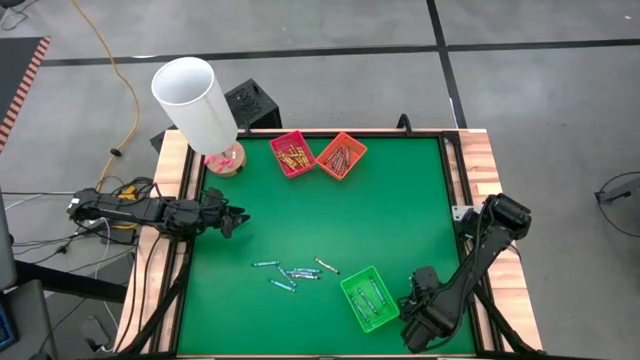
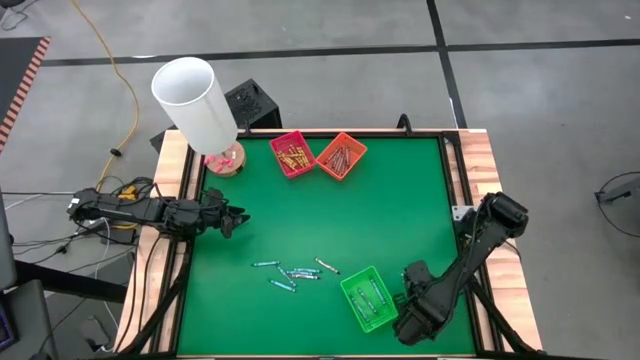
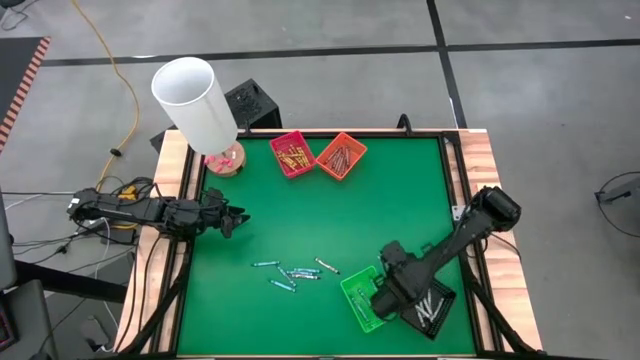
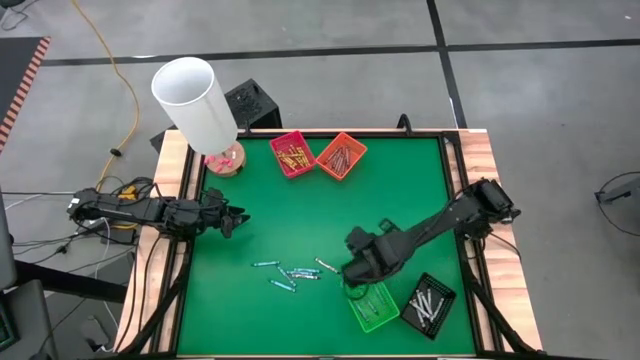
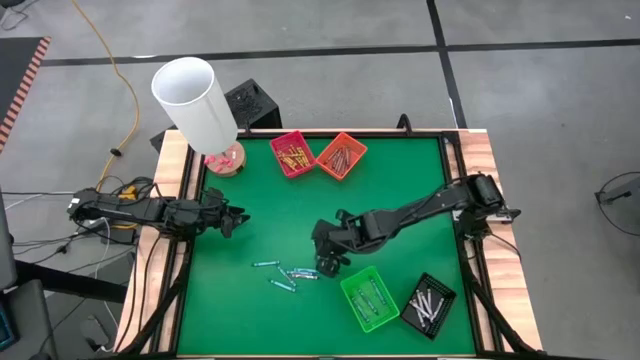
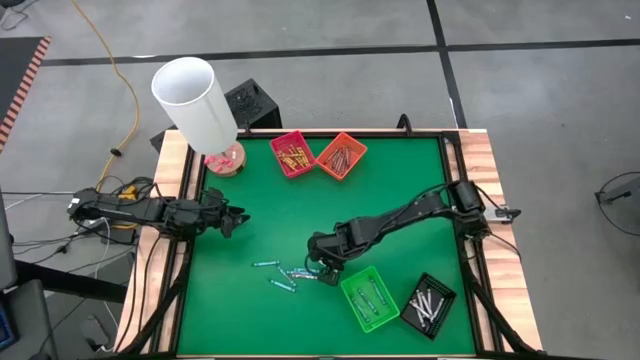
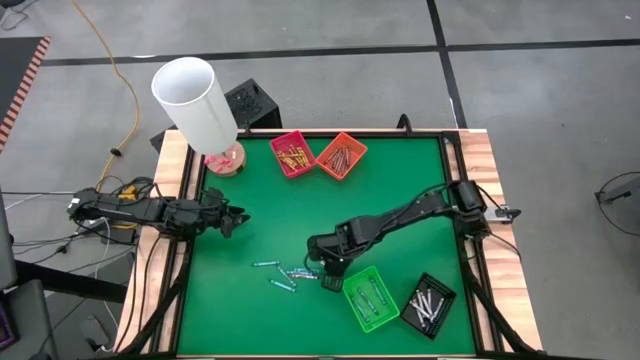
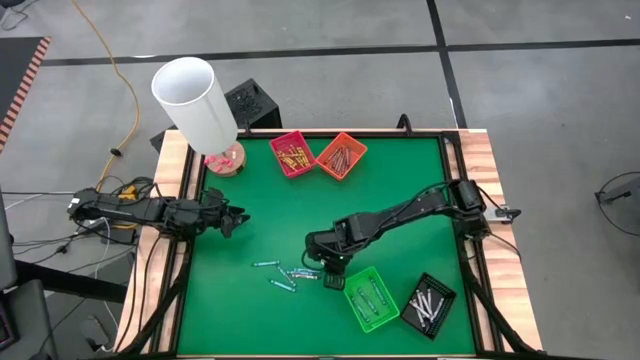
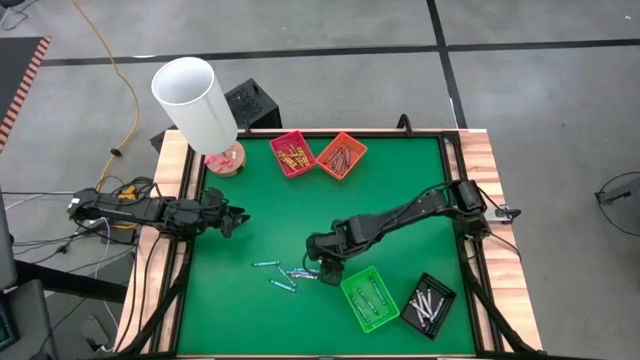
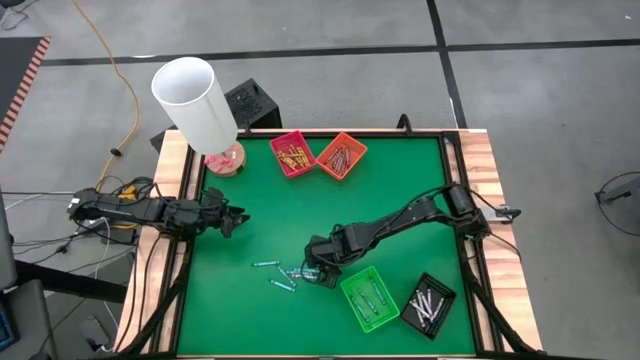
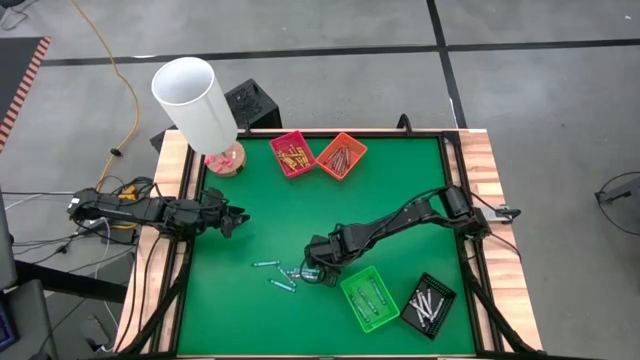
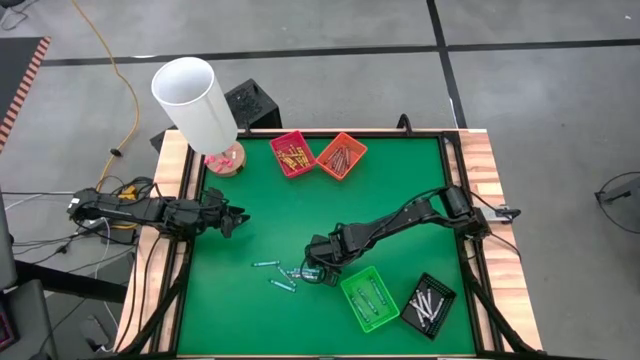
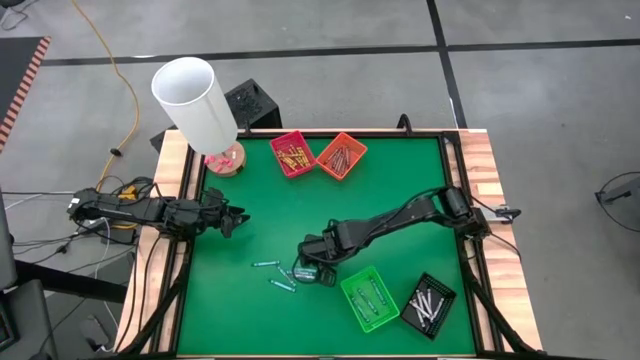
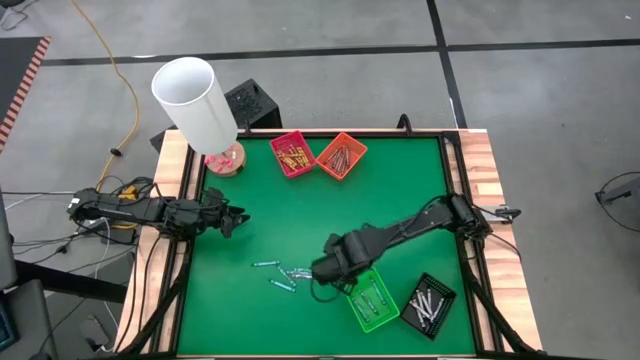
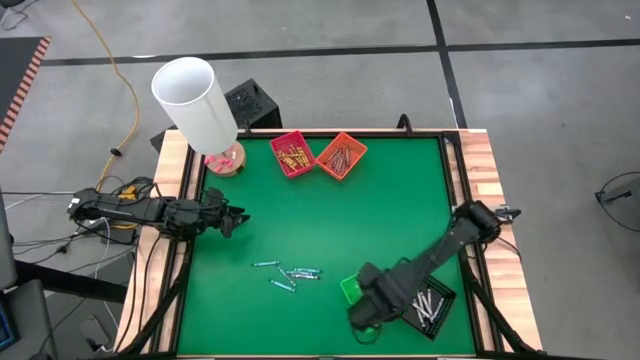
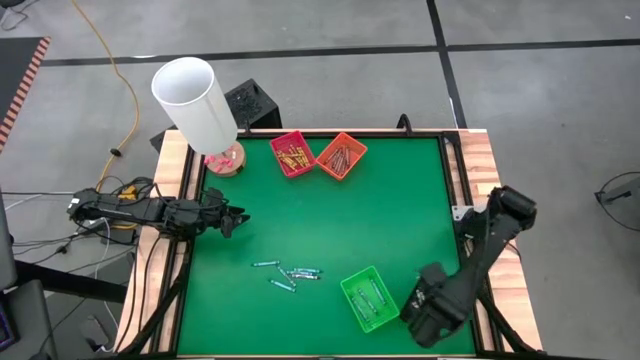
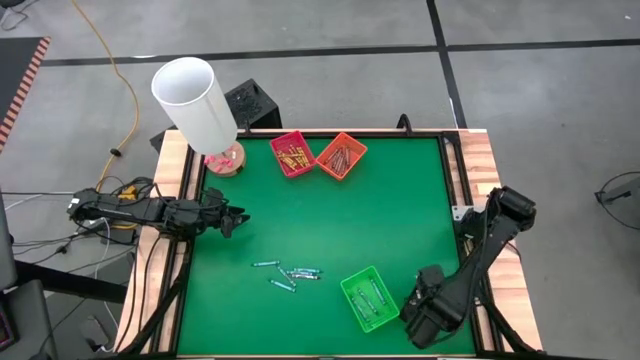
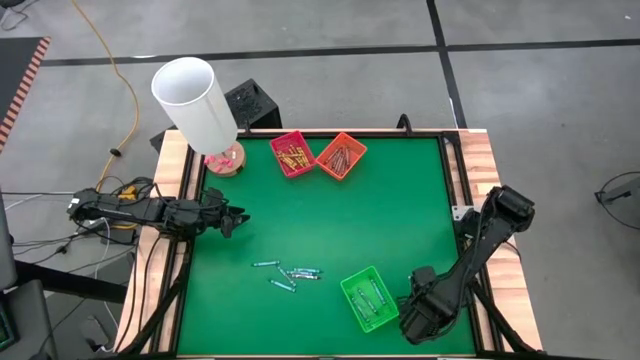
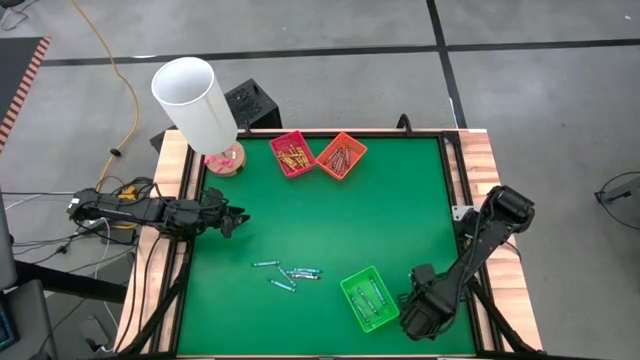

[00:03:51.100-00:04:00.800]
Task: Sort crayons
Put the black crayon into the black bin

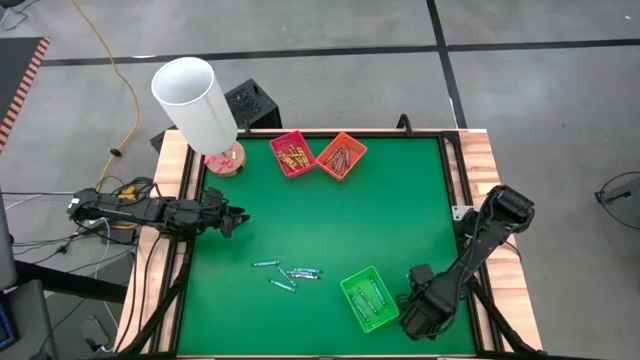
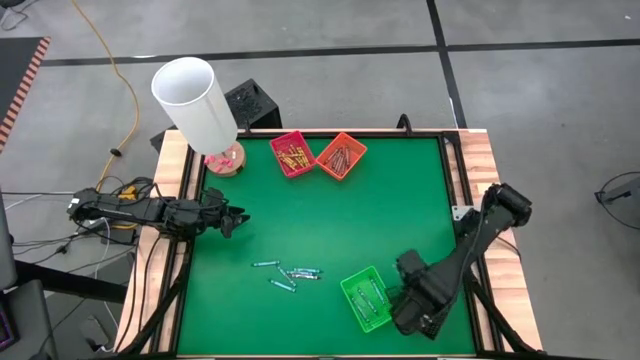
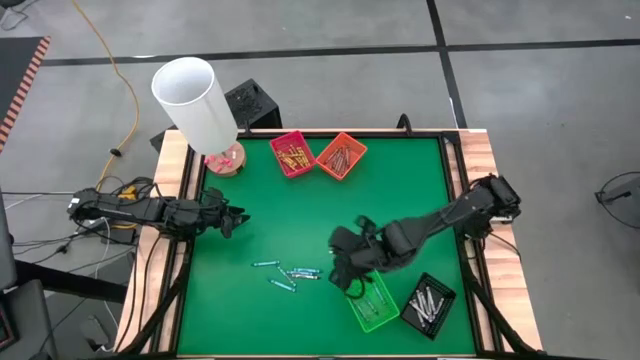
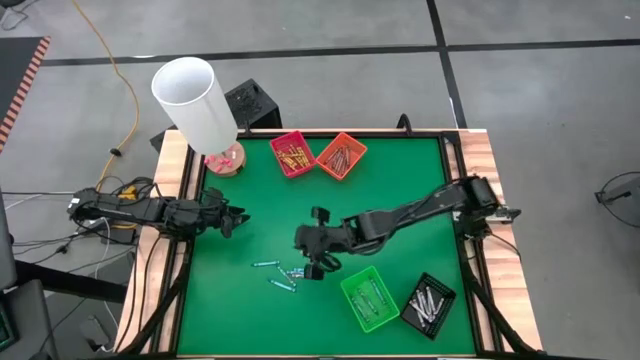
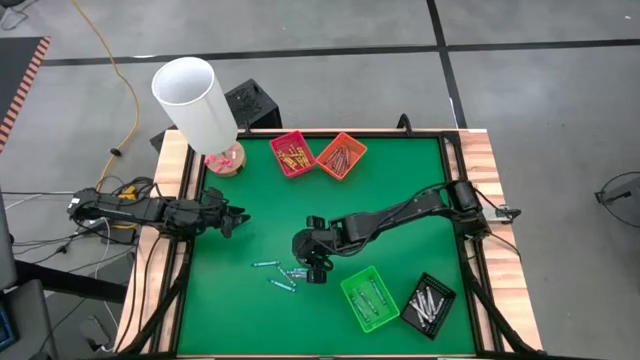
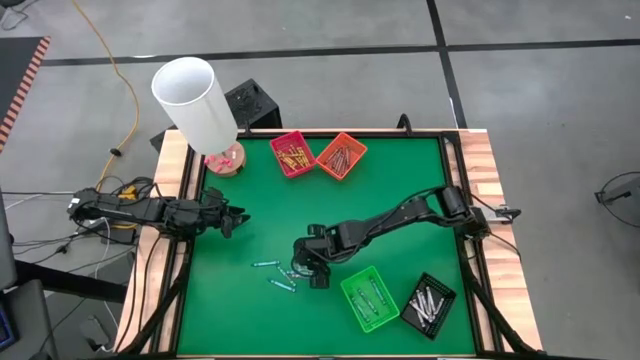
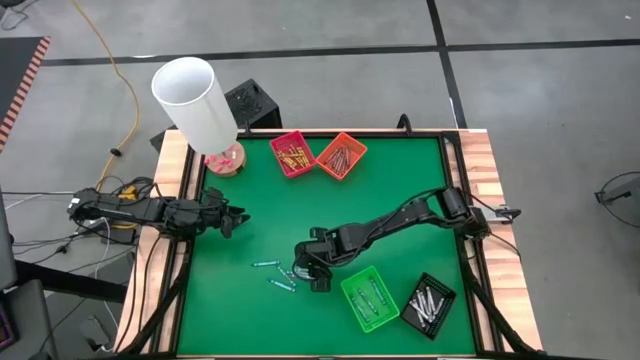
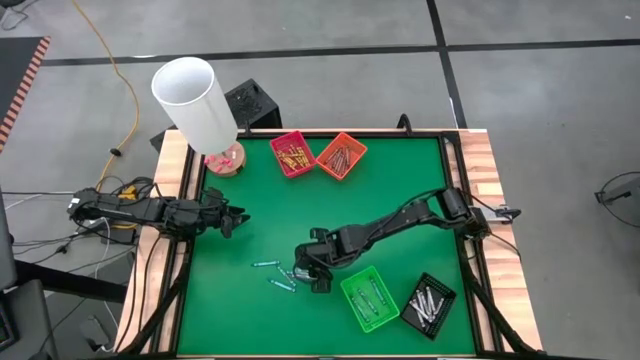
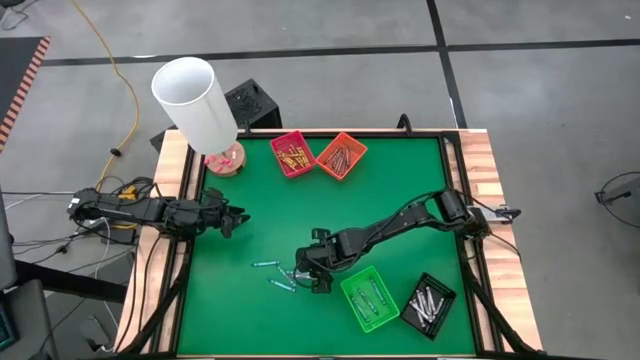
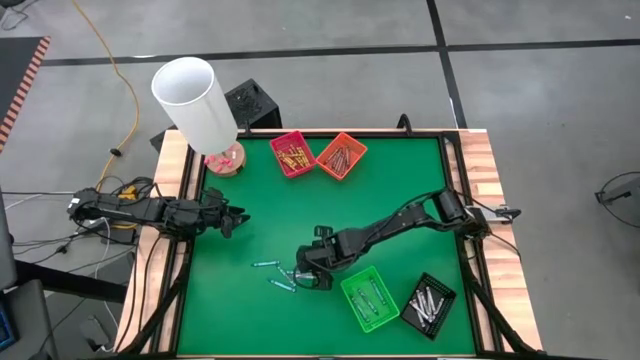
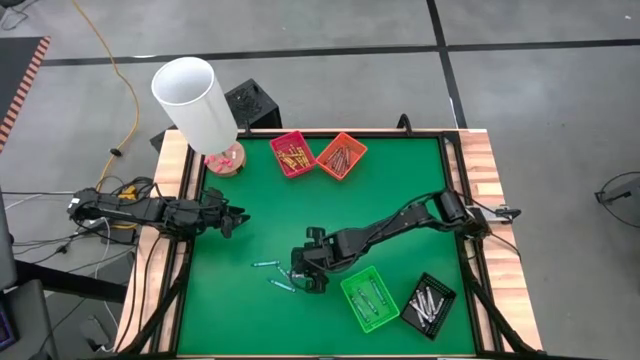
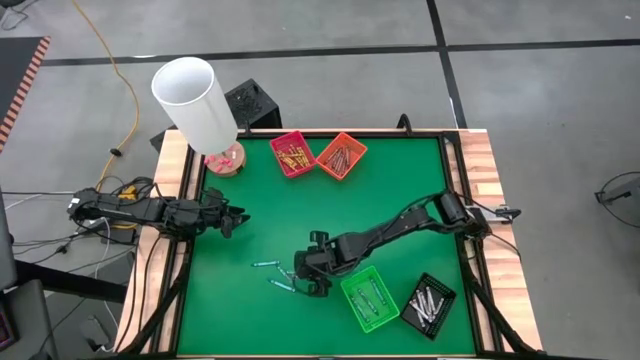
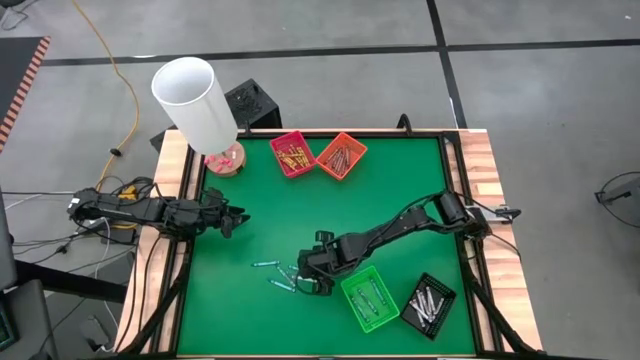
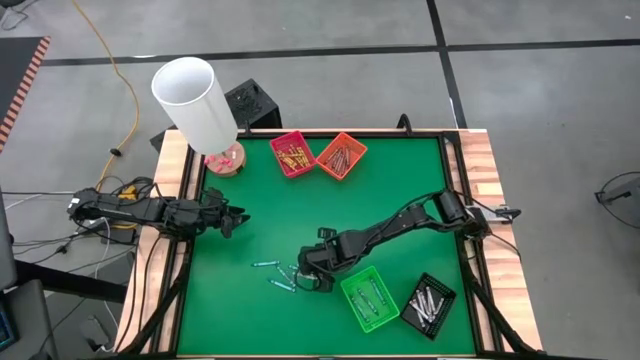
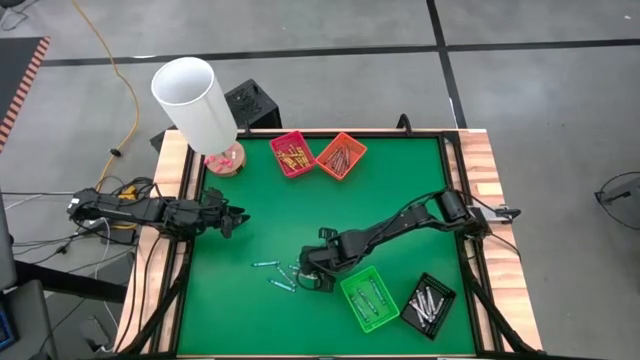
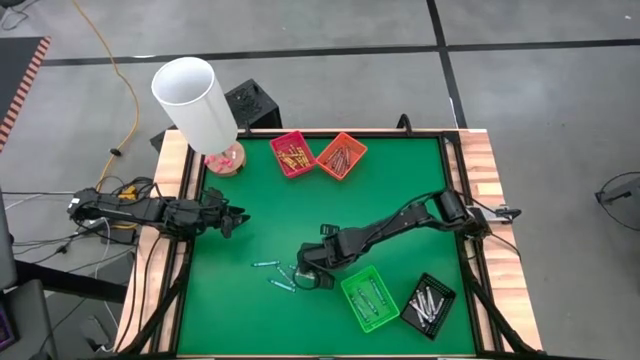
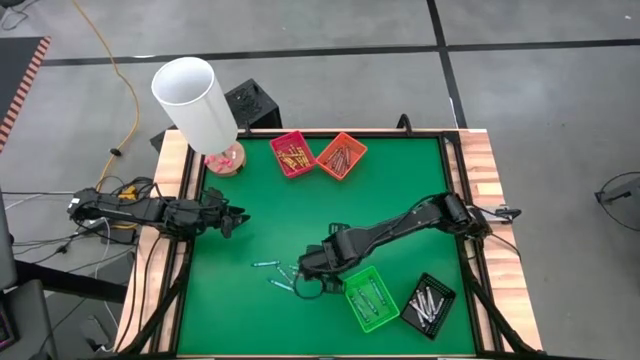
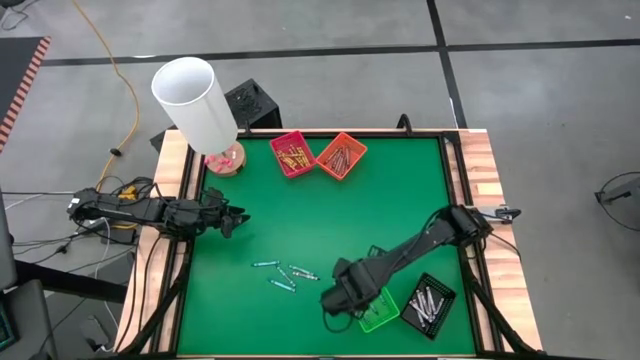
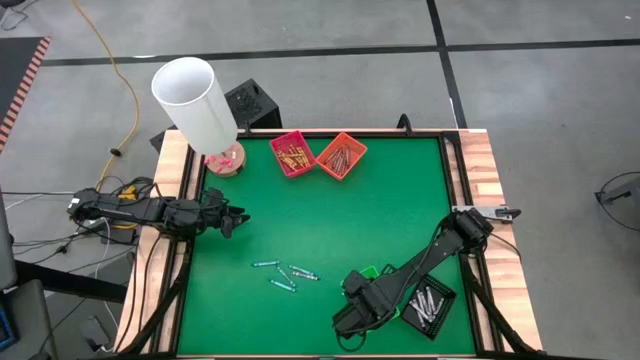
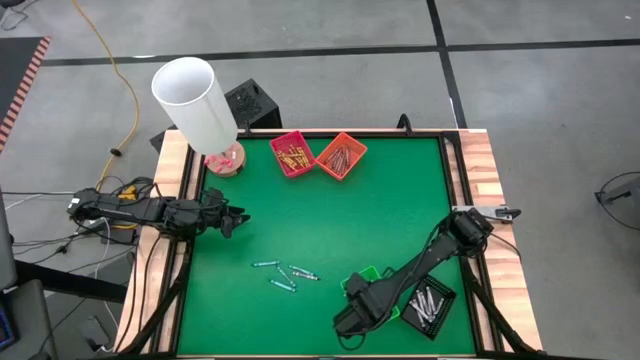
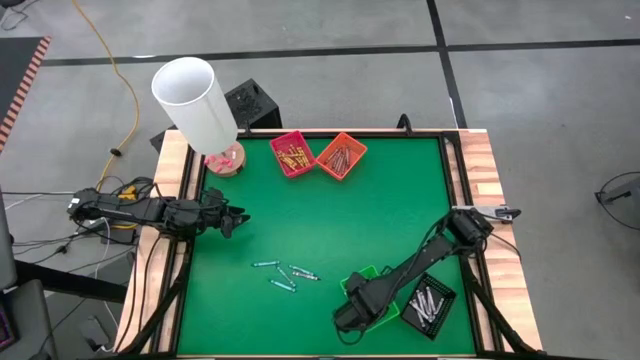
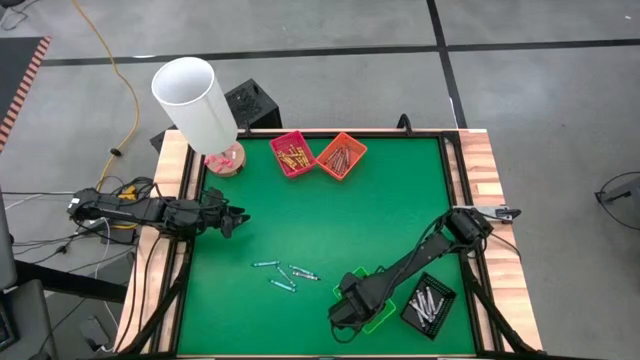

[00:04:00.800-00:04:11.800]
Put the green crayon into the green bin

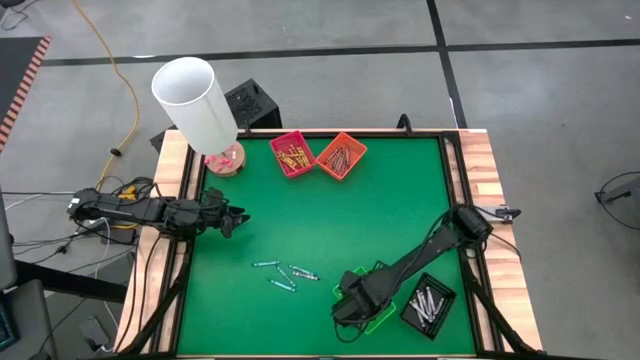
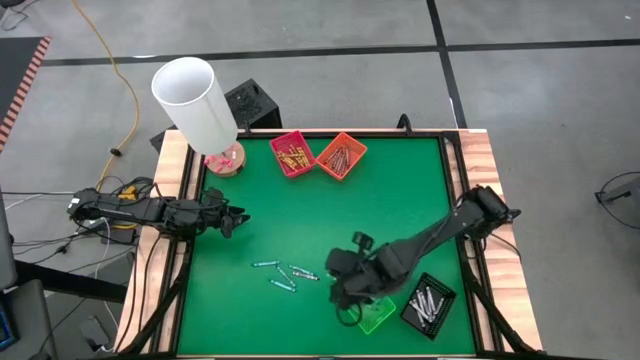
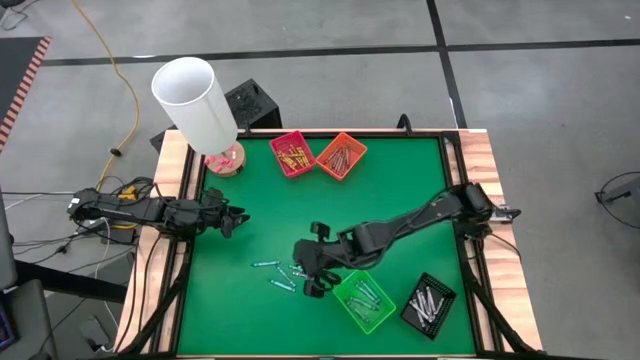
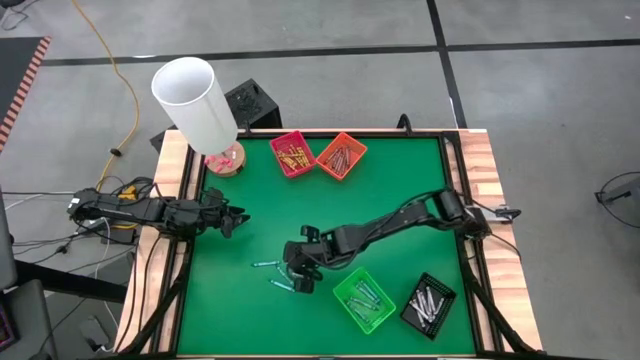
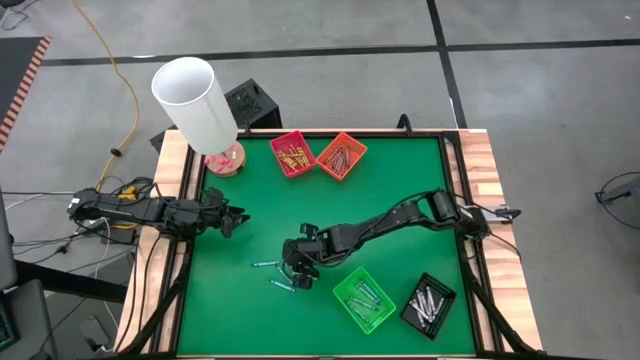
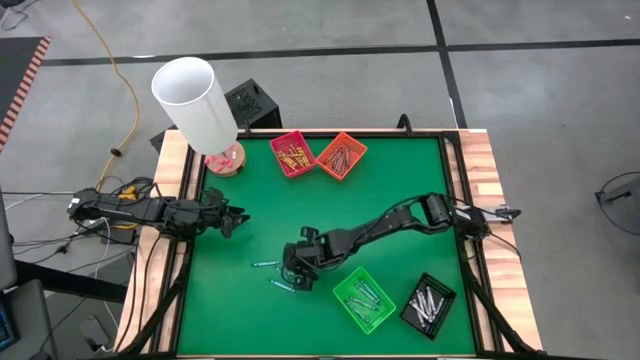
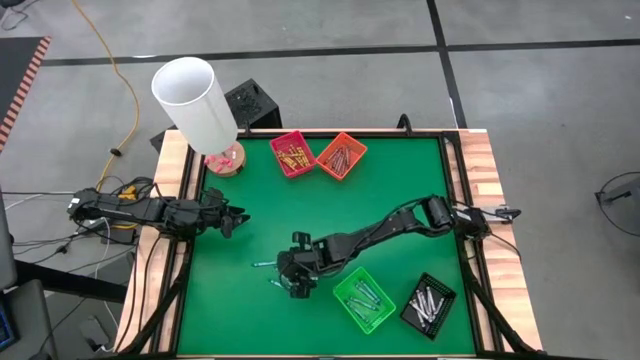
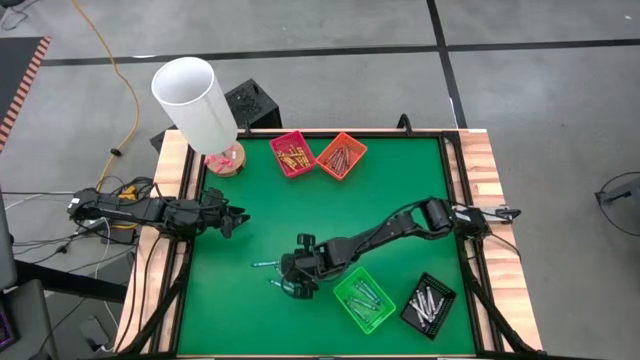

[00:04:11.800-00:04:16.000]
Put the green crayon into the green bin
